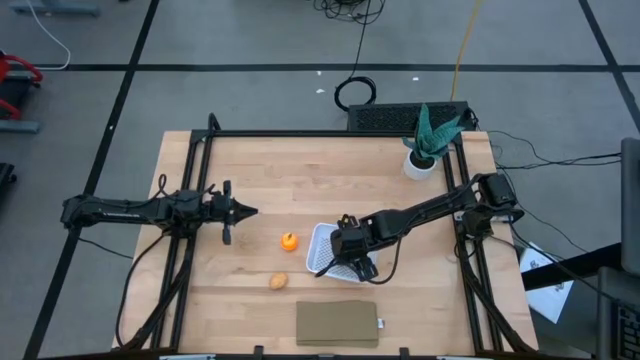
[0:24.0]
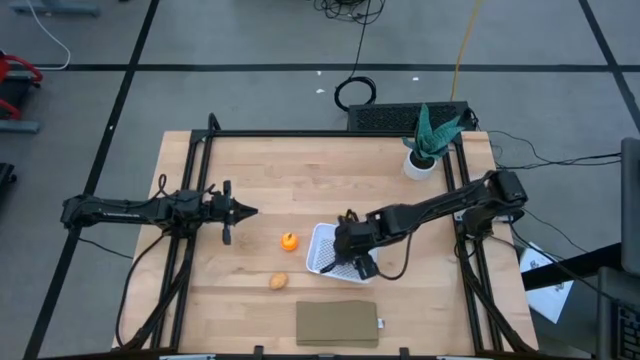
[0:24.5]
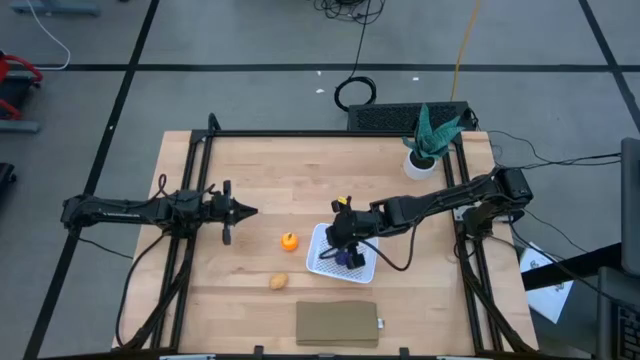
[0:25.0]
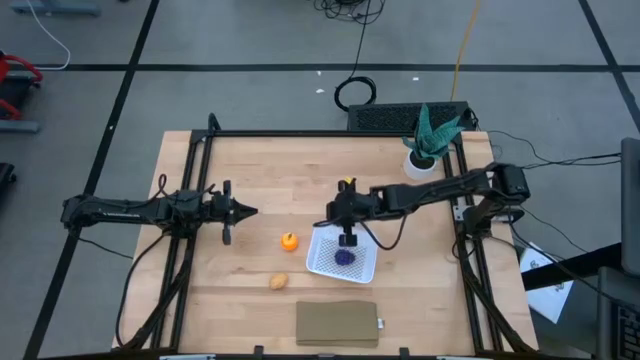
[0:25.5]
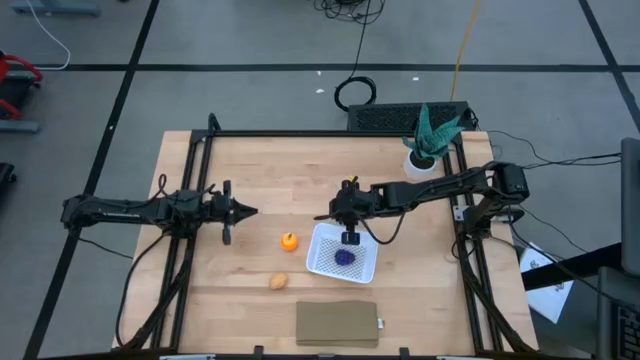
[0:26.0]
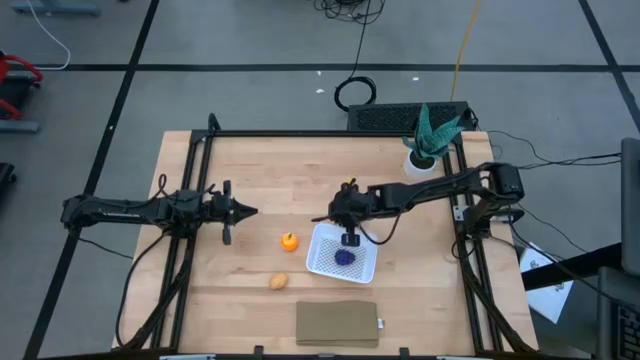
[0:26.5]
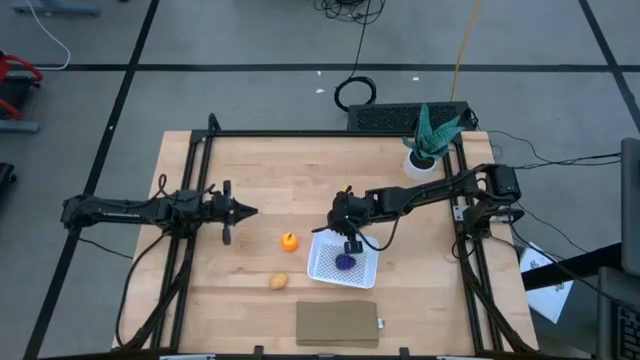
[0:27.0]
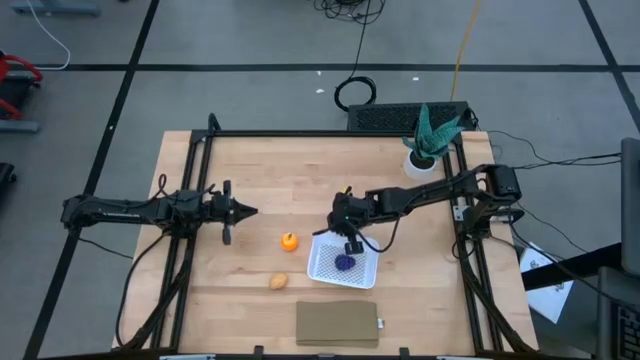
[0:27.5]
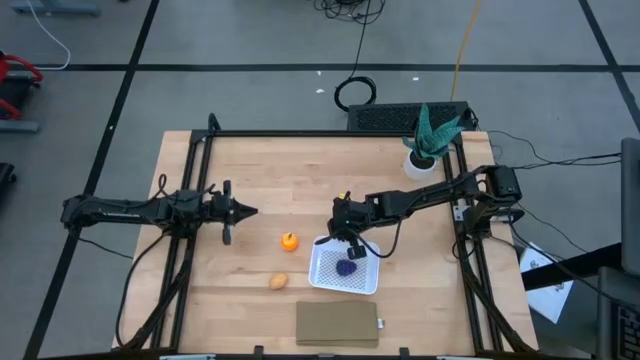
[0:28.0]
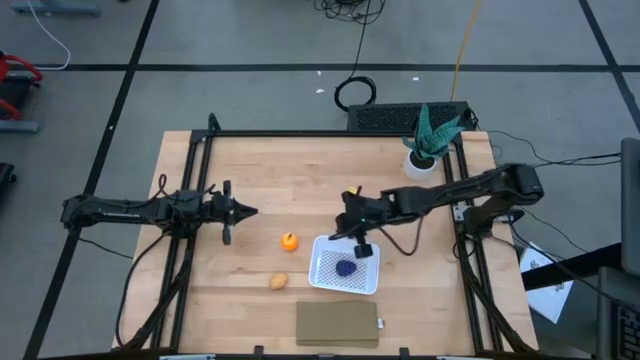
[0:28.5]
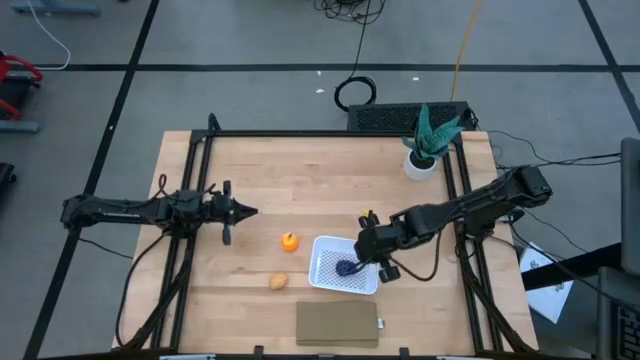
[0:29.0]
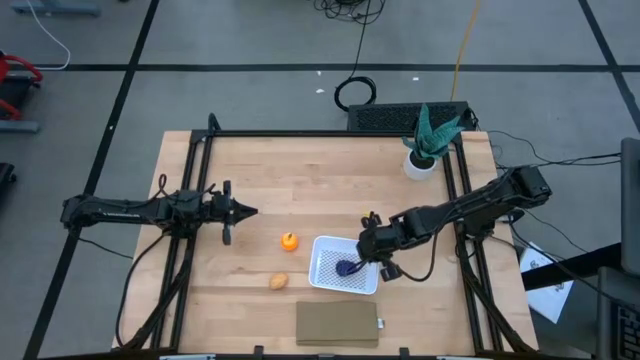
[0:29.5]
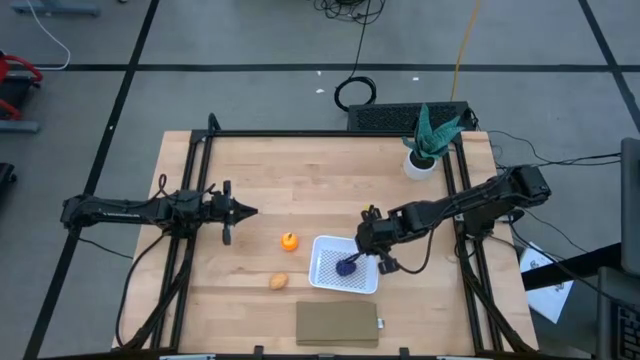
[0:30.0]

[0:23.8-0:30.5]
Task: Pick and placing Produce into tupperware
Adjust the white basket

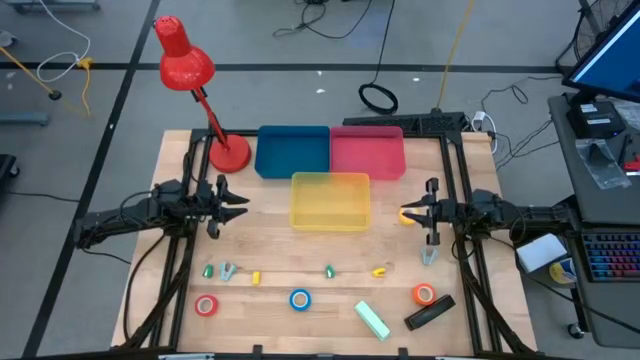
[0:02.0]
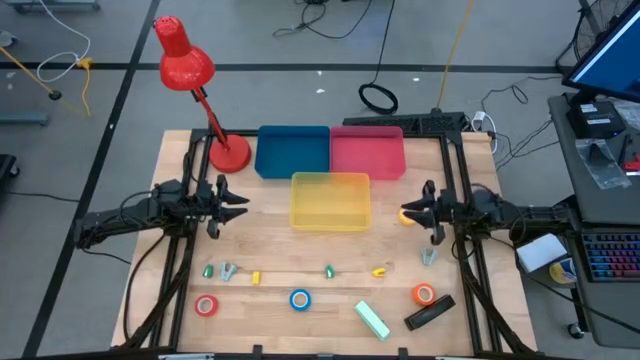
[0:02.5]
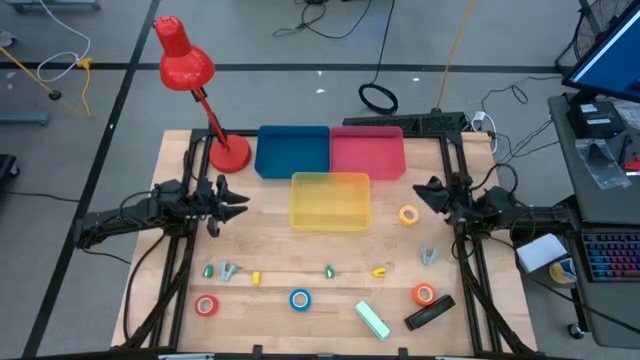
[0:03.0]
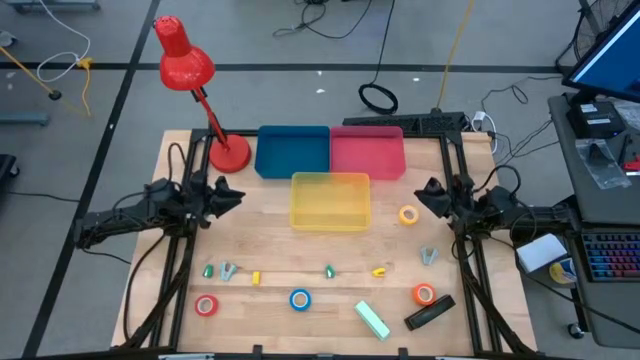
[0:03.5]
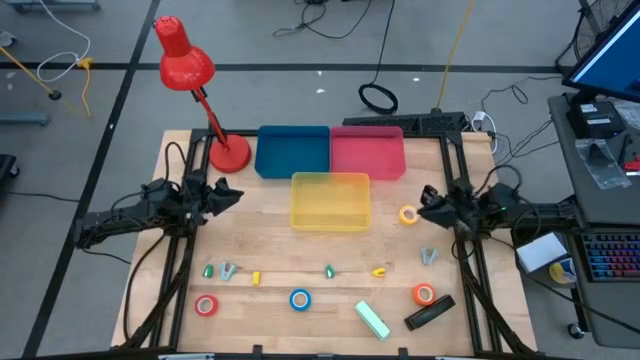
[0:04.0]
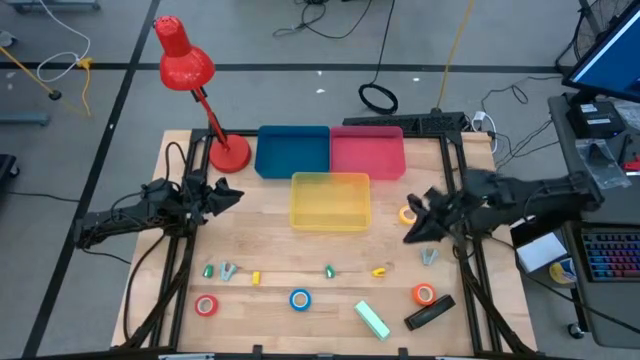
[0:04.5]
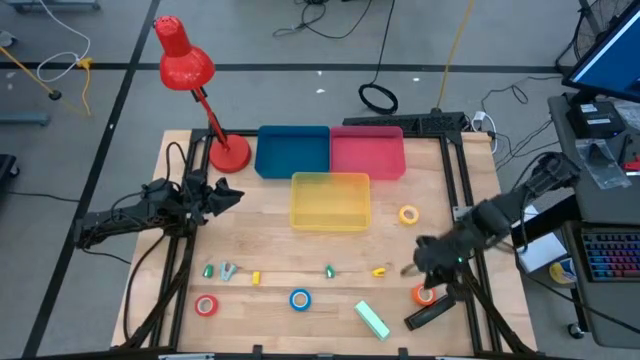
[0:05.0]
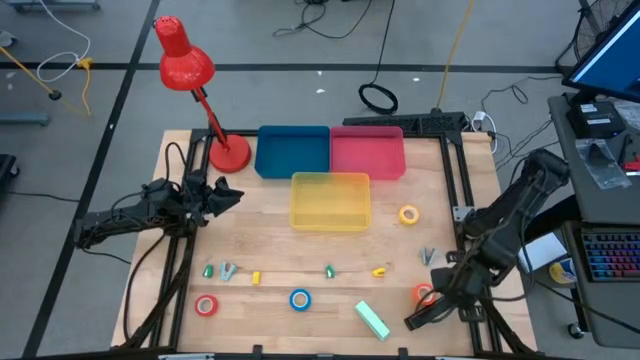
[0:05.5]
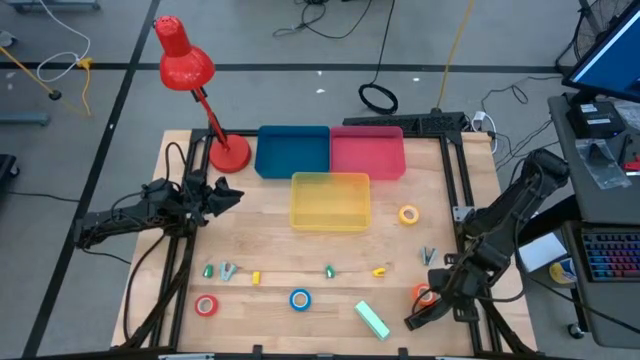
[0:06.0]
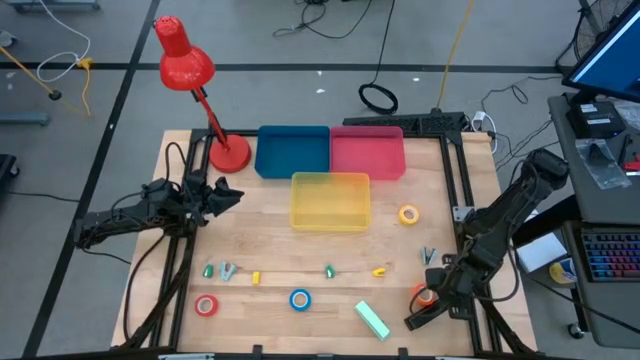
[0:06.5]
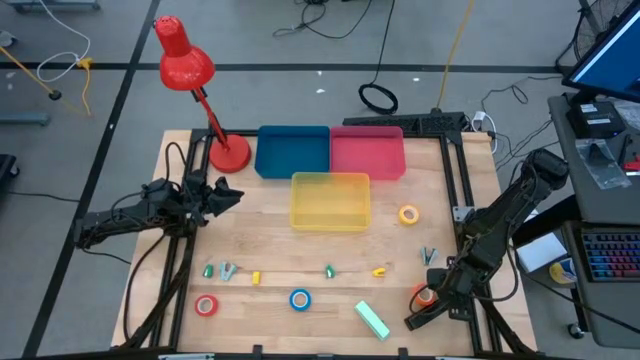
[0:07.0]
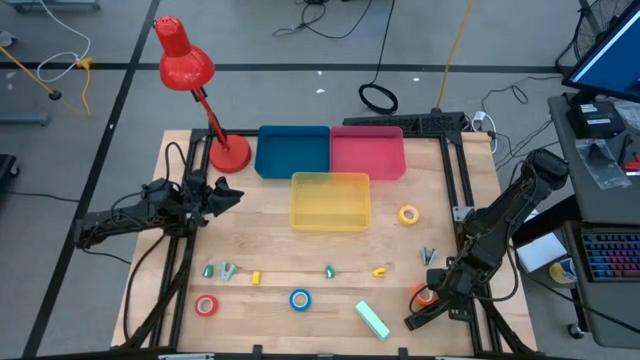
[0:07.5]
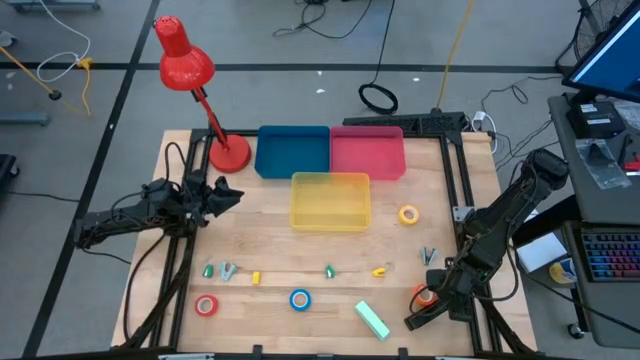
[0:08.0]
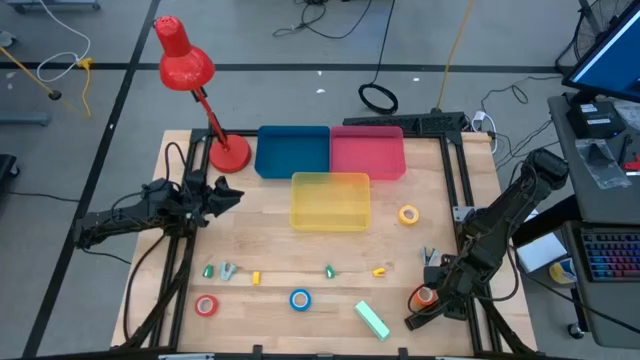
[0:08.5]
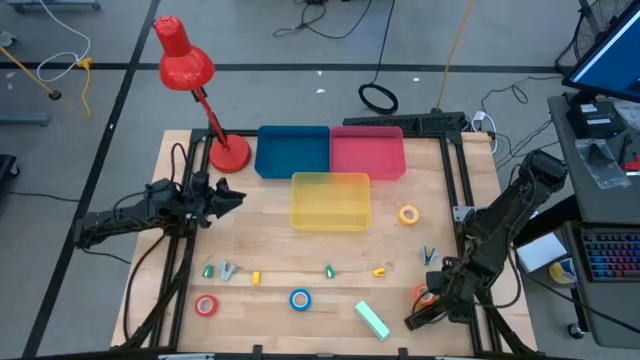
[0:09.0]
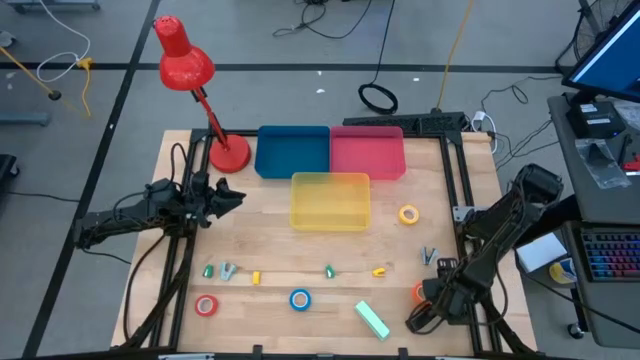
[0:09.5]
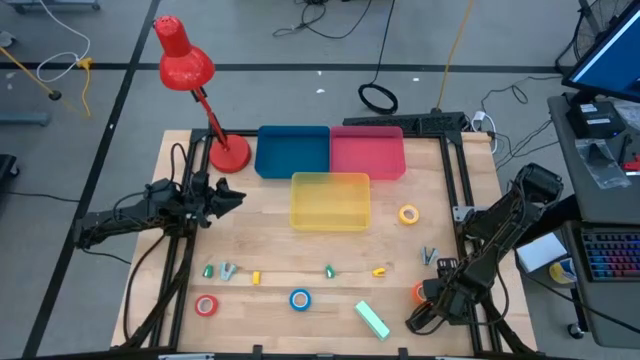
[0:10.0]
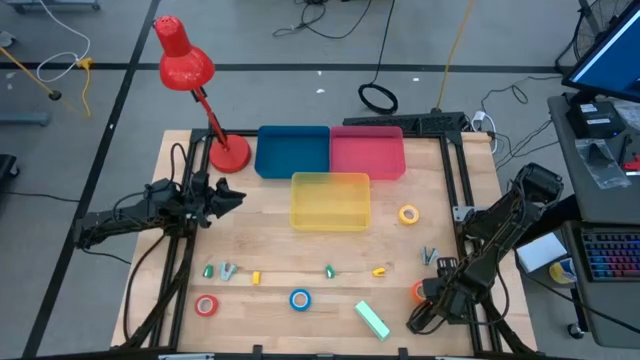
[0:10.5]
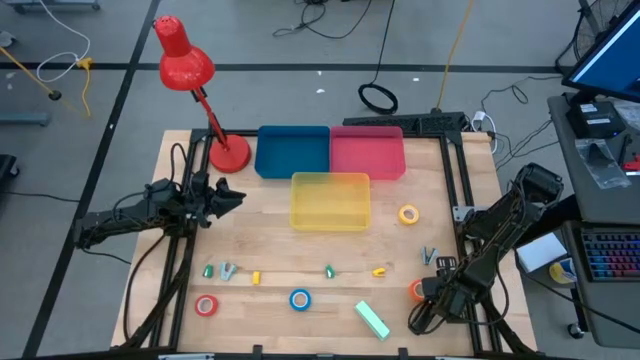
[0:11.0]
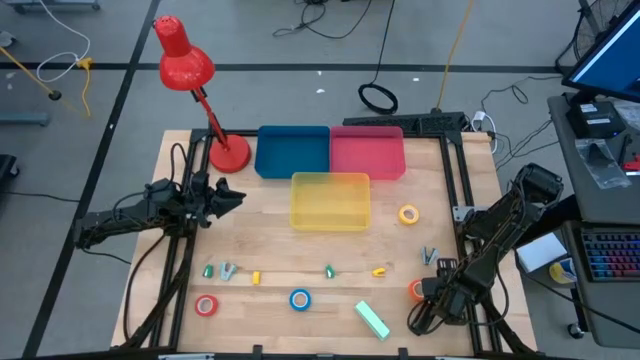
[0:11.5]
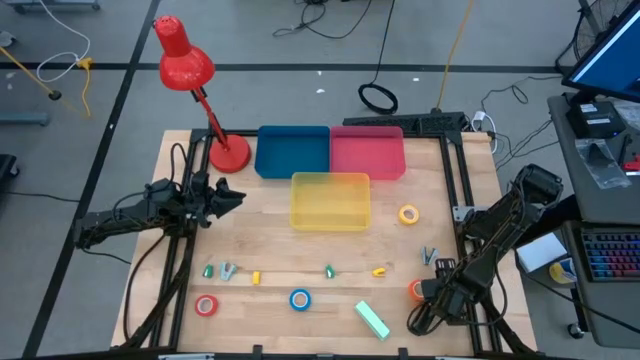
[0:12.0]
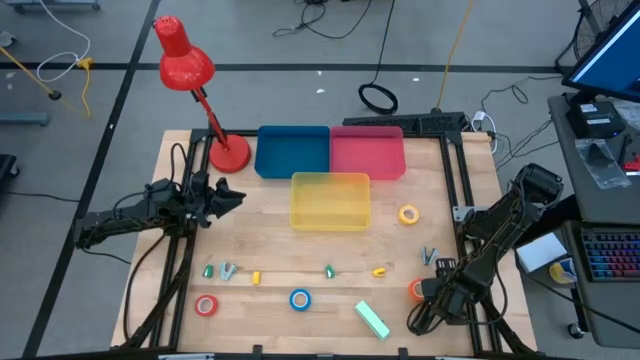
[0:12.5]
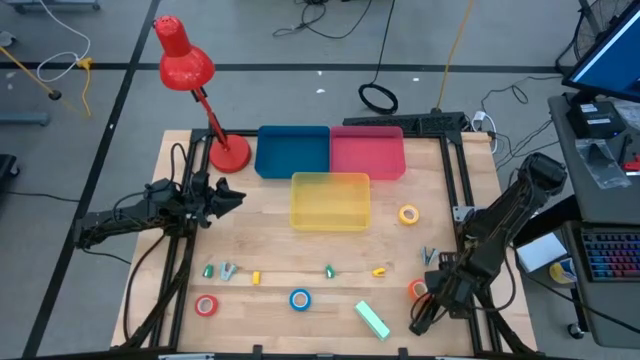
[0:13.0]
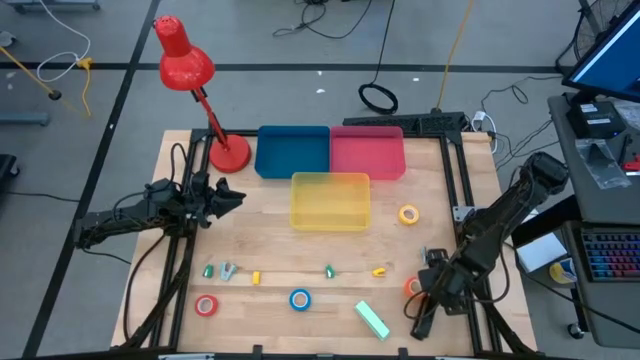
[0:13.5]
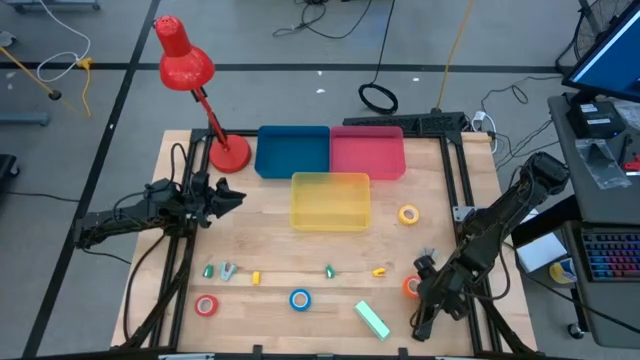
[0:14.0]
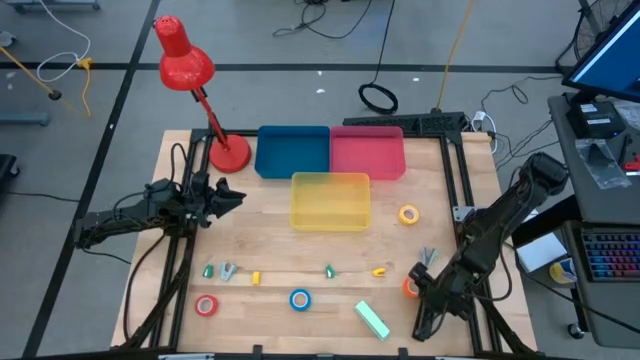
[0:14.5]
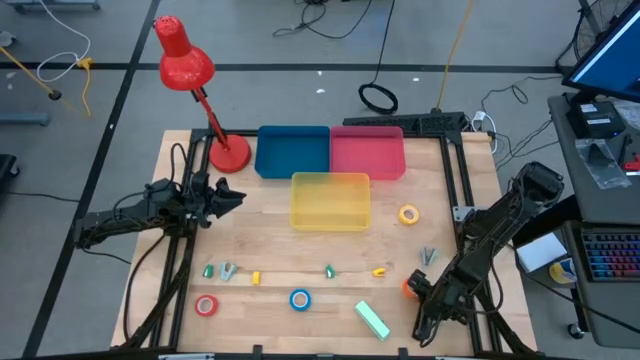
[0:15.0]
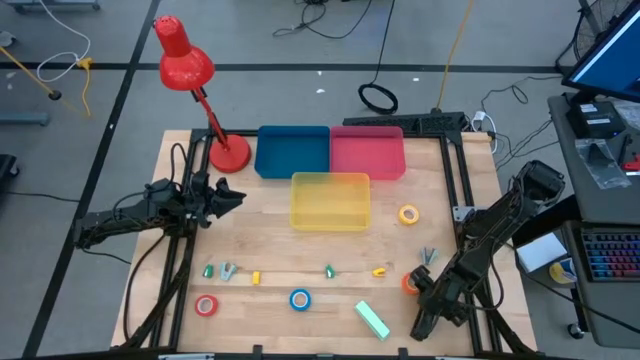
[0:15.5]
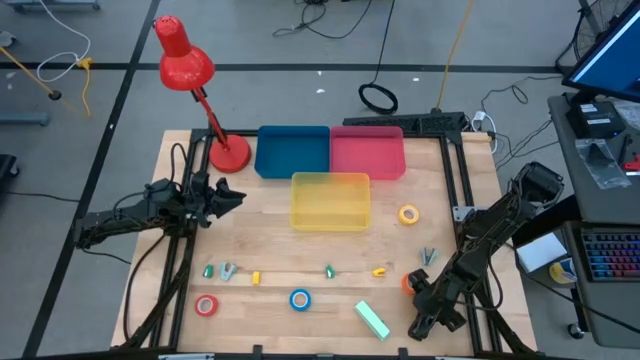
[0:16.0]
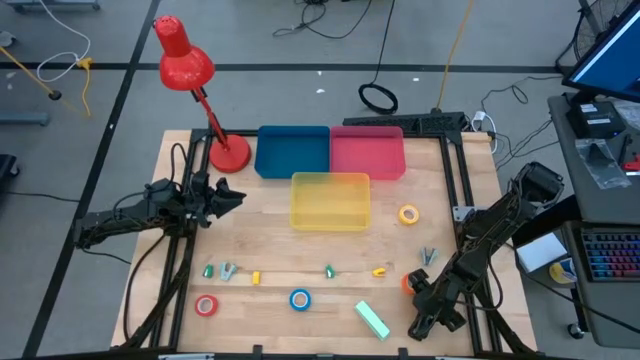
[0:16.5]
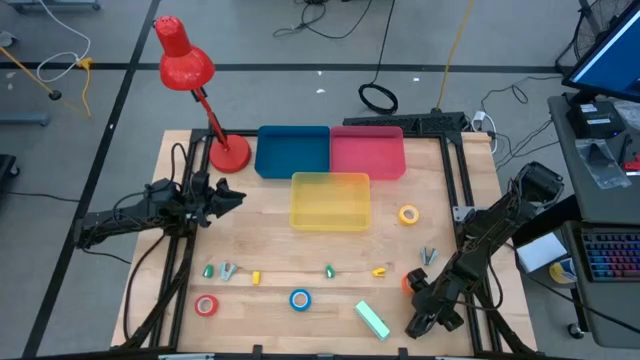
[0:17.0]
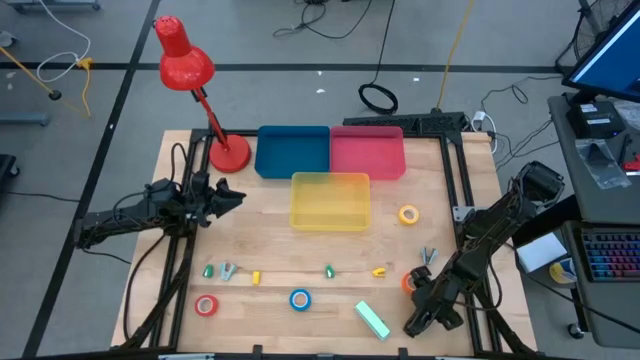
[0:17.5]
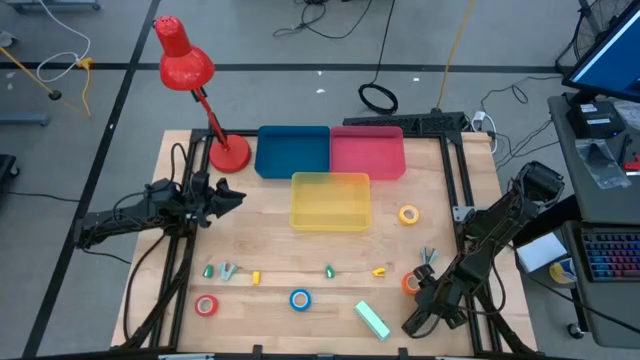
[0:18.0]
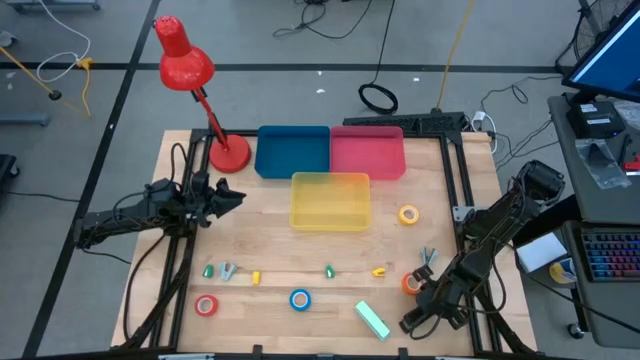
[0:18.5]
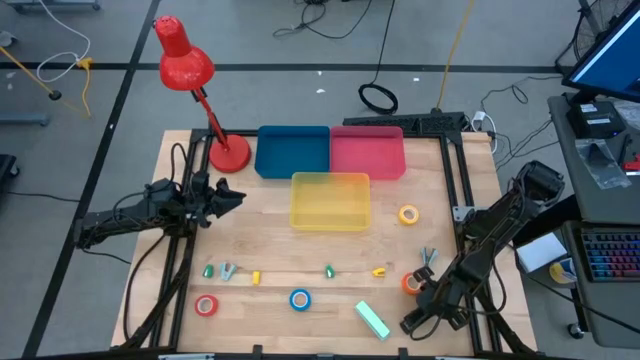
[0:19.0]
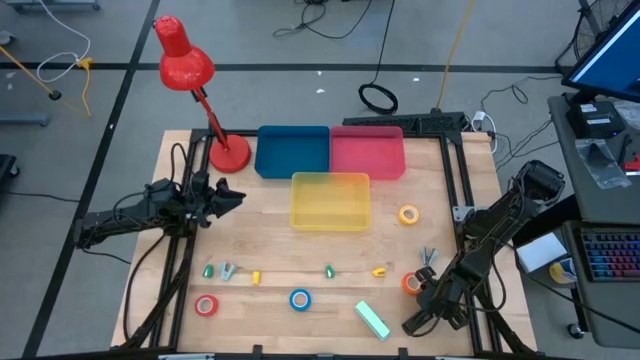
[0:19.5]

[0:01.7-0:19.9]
Task: Pick and place Stapler, Stapler remover, tape
Put the black stapler into the blue bin
